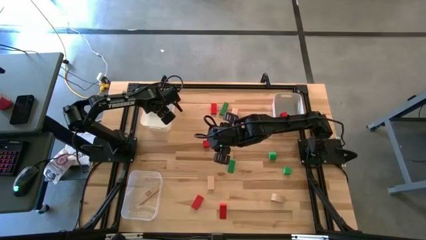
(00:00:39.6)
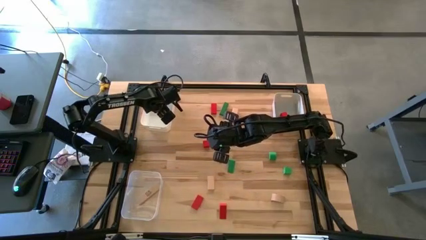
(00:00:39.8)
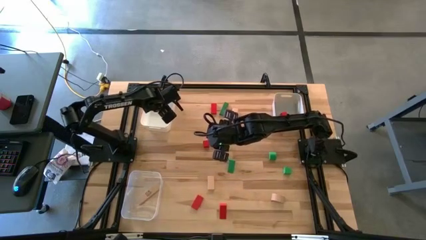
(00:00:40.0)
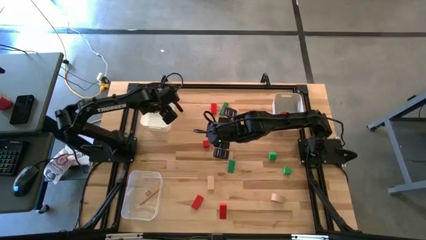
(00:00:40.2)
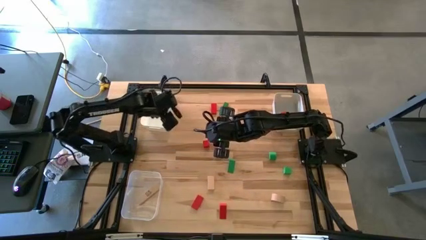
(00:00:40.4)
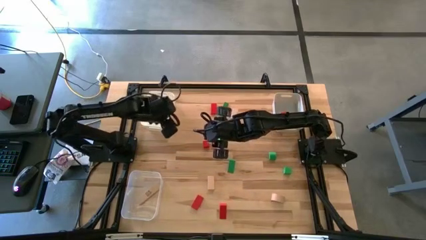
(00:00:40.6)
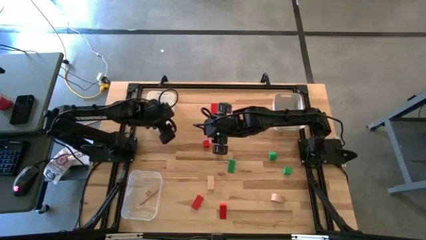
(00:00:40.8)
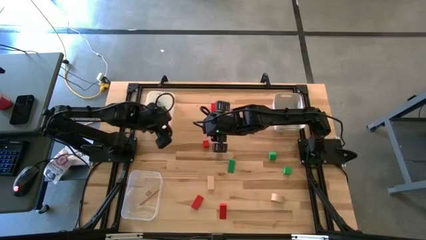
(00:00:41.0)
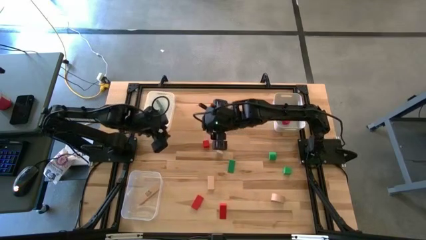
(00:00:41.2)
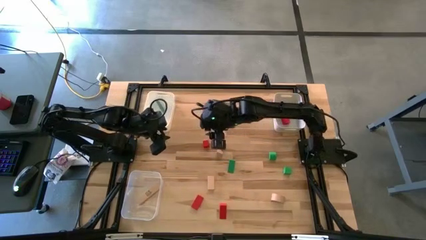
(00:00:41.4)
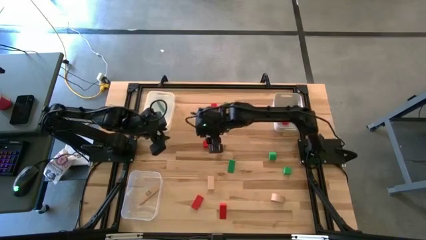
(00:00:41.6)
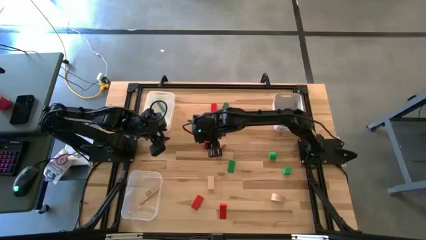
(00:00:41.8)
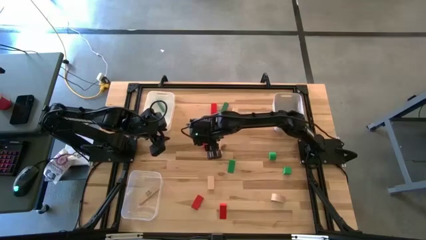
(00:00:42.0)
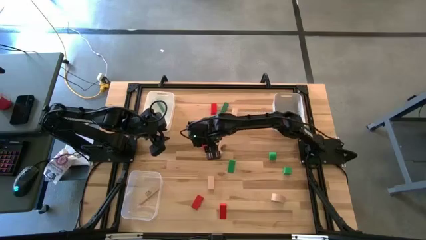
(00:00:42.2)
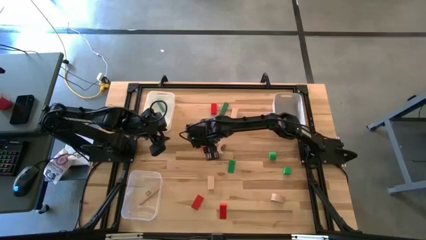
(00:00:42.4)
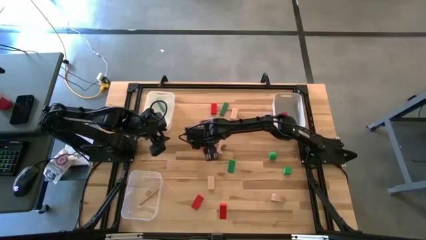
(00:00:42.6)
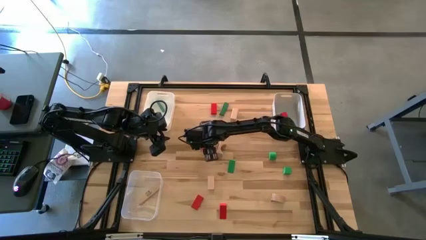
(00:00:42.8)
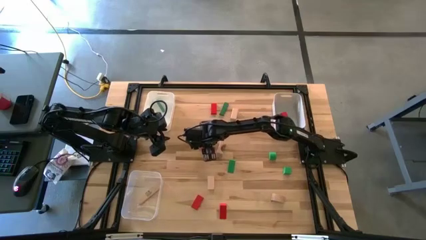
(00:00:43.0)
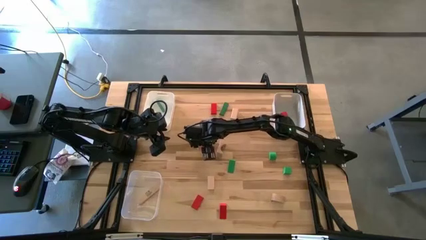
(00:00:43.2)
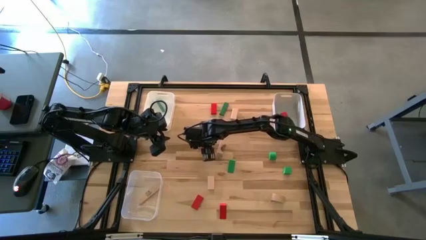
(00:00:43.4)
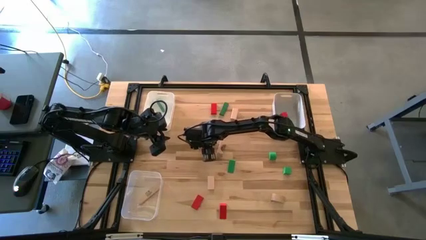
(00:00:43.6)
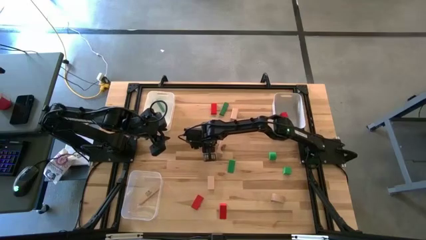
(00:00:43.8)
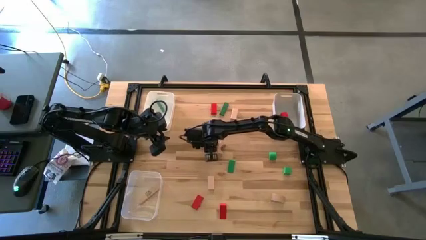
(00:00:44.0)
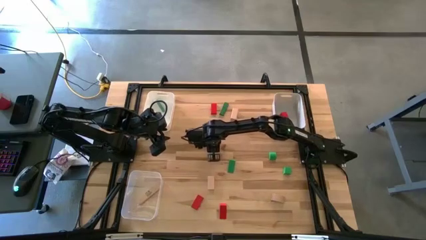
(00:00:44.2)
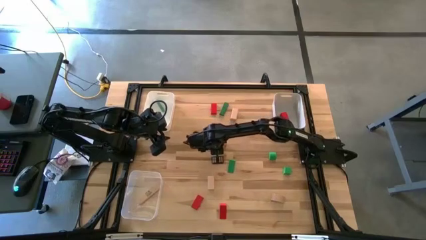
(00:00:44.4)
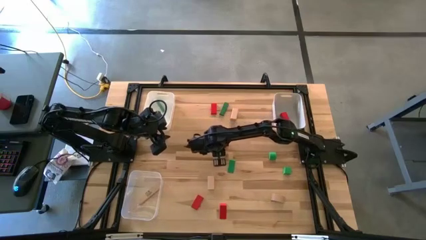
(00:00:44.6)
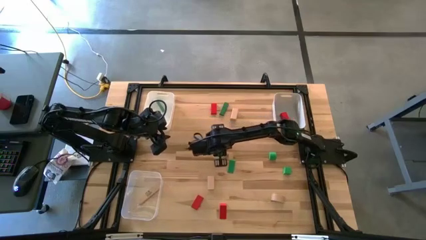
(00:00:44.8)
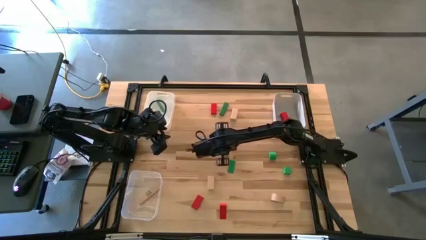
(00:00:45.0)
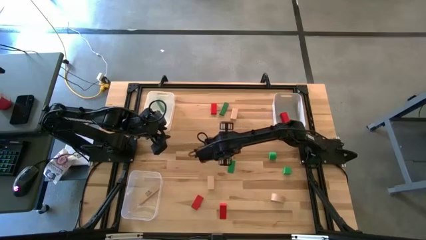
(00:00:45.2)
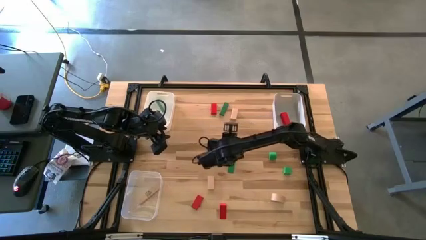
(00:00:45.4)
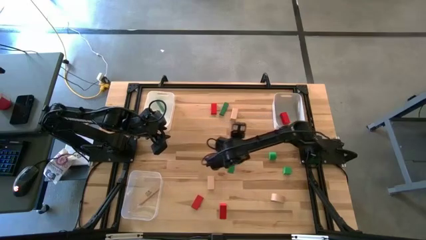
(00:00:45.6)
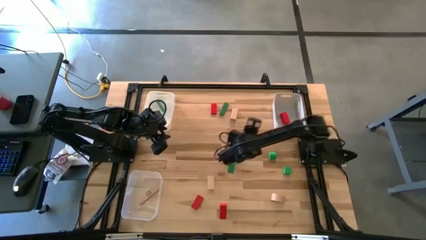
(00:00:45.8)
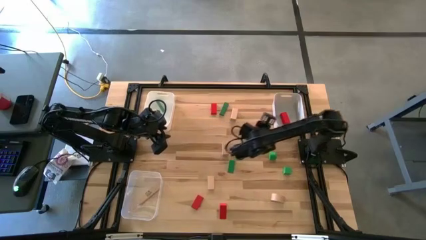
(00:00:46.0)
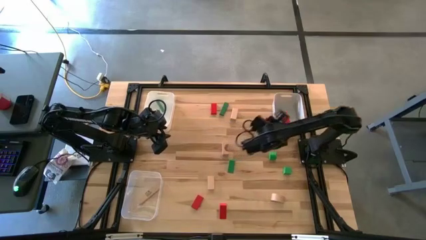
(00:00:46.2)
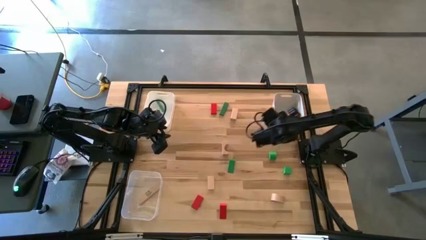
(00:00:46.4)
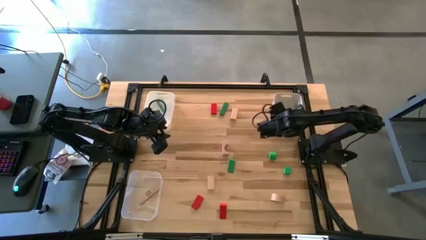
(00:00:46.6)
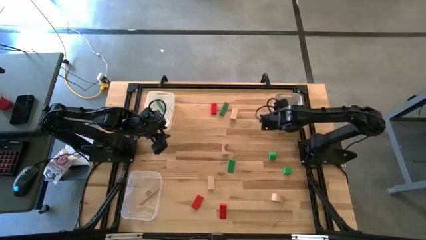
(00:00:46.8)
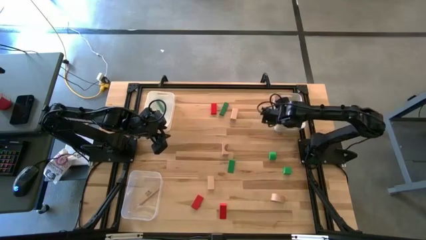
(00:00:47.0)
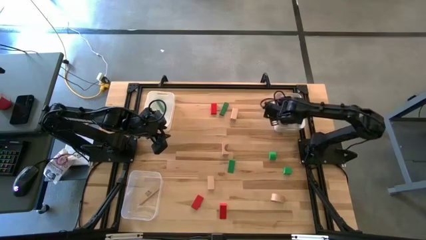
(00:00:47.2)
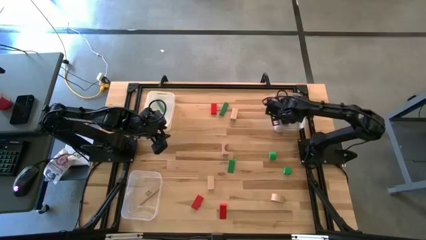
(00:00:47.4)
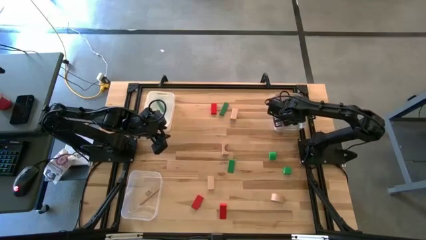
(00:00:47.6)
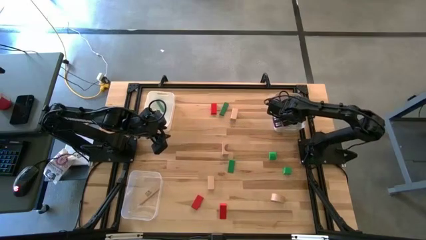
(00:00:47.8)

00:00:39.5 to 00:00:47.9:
Task: Sort & place blocks by color
Put the red block in the gray bin
